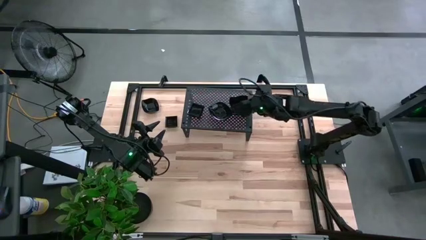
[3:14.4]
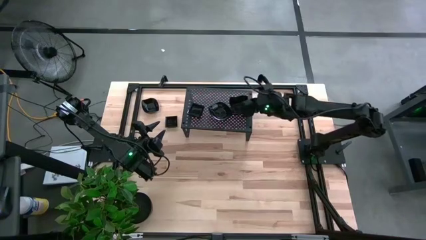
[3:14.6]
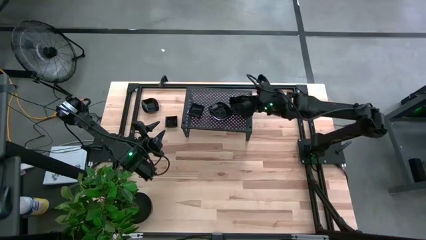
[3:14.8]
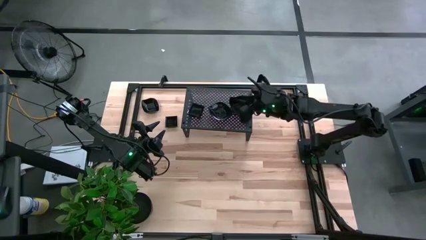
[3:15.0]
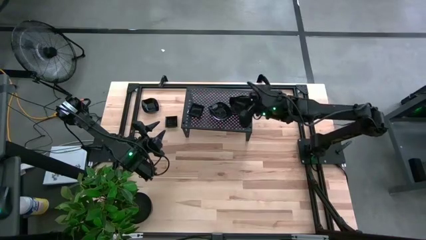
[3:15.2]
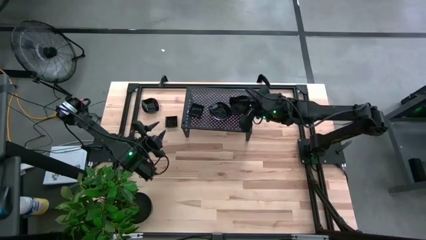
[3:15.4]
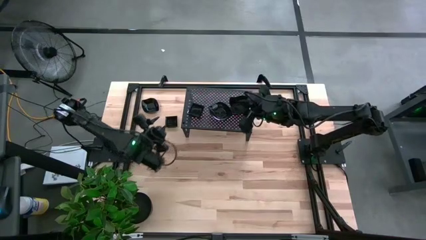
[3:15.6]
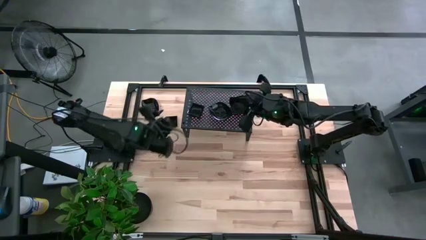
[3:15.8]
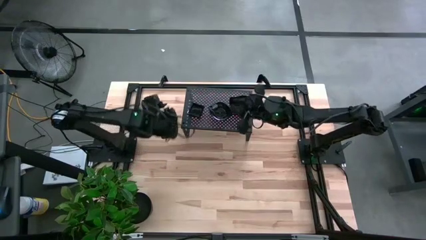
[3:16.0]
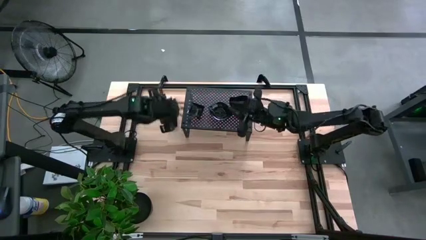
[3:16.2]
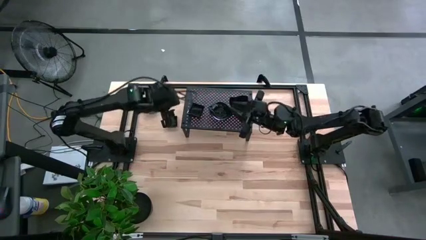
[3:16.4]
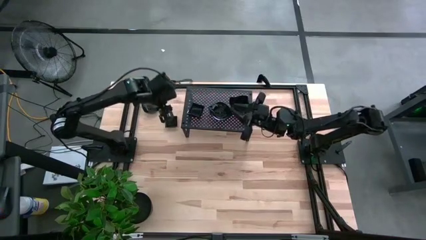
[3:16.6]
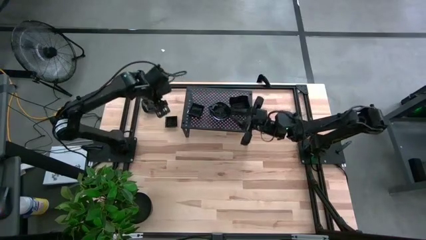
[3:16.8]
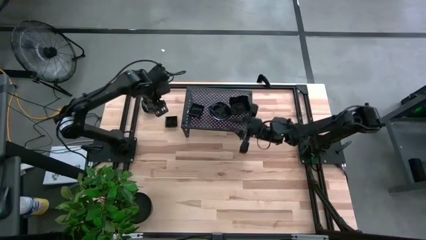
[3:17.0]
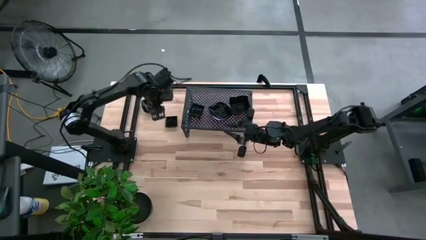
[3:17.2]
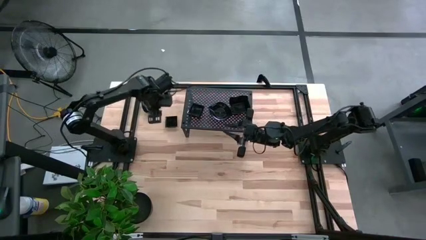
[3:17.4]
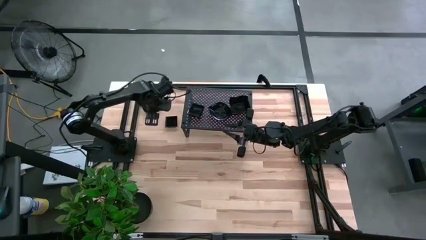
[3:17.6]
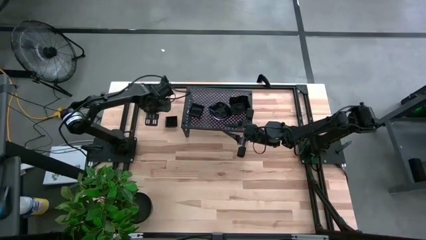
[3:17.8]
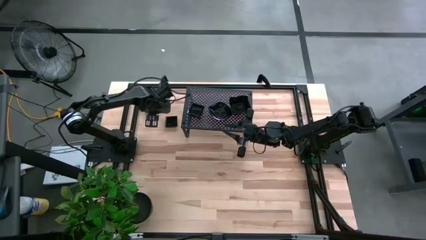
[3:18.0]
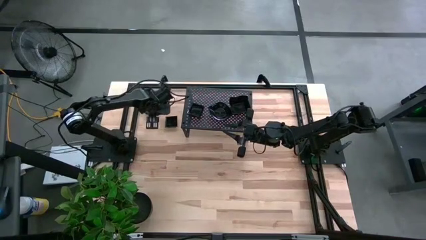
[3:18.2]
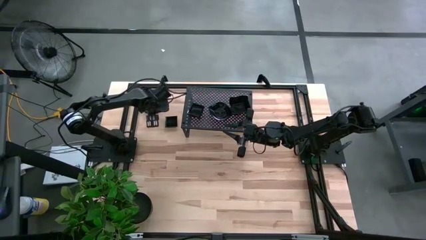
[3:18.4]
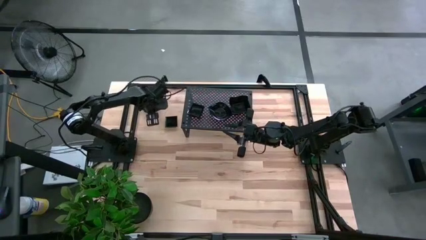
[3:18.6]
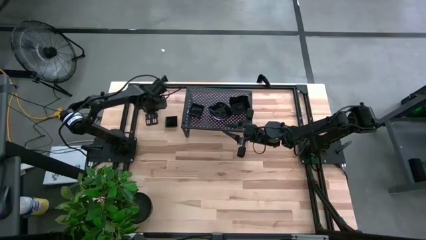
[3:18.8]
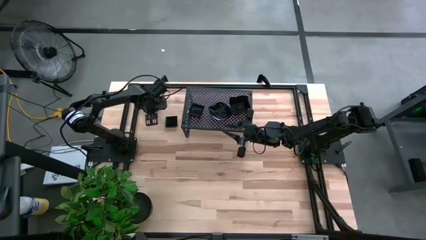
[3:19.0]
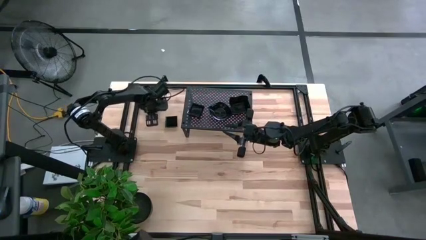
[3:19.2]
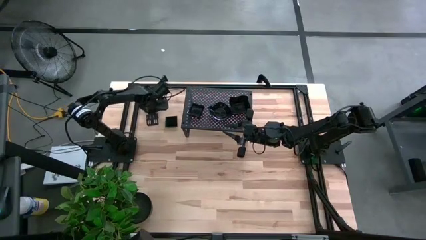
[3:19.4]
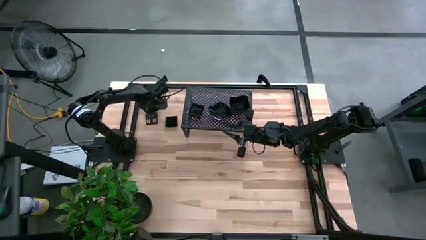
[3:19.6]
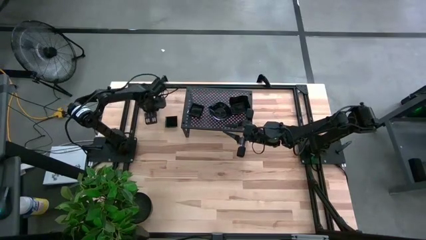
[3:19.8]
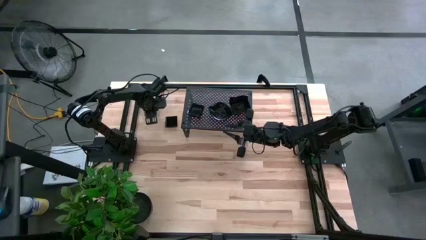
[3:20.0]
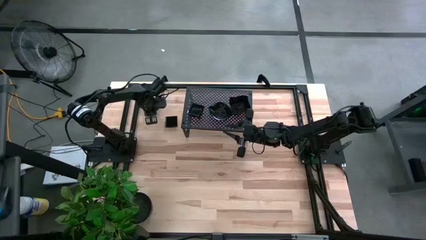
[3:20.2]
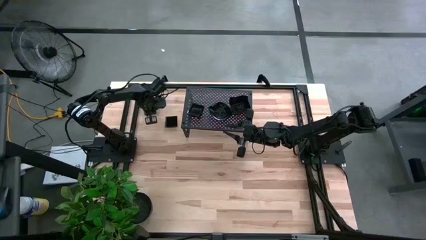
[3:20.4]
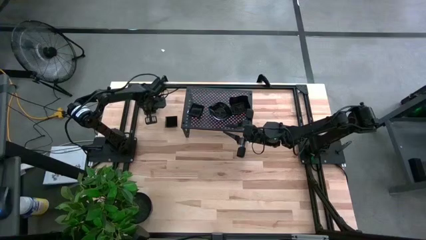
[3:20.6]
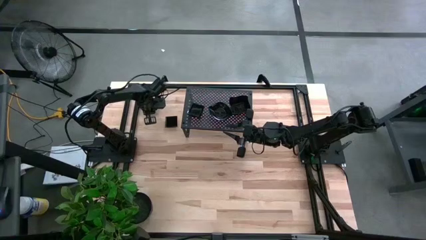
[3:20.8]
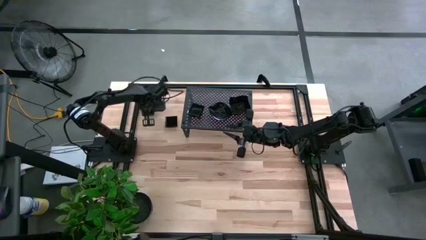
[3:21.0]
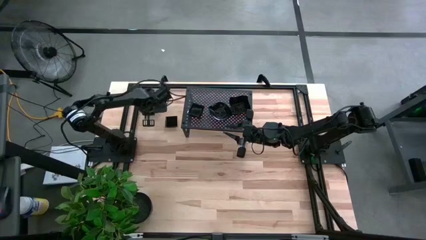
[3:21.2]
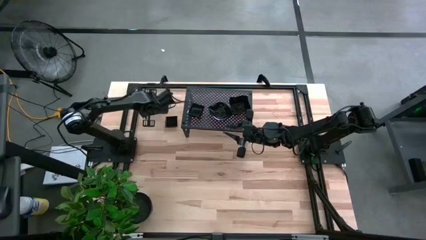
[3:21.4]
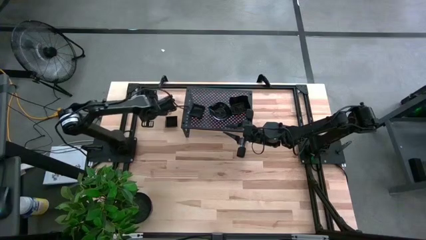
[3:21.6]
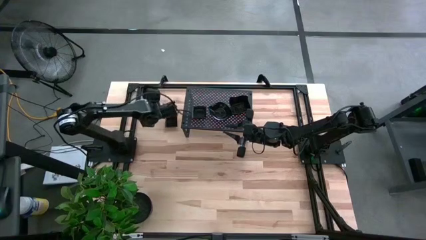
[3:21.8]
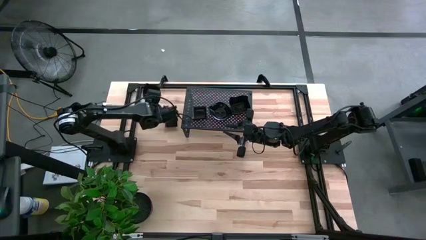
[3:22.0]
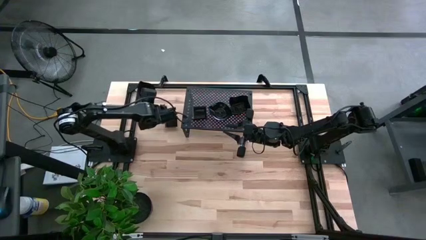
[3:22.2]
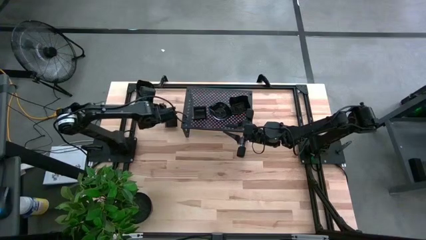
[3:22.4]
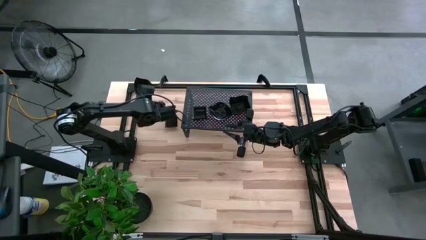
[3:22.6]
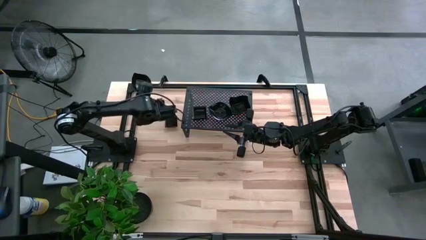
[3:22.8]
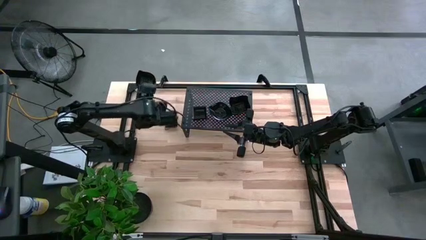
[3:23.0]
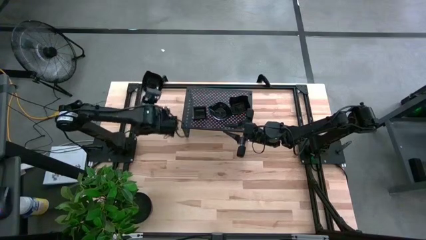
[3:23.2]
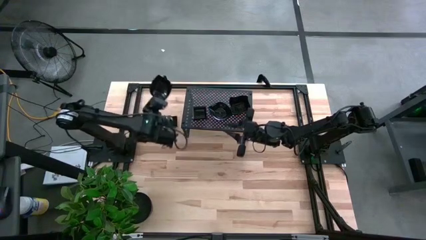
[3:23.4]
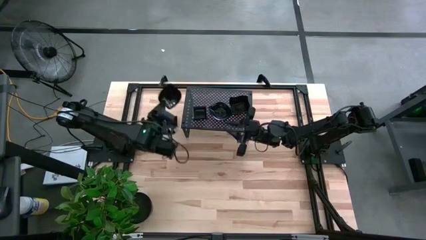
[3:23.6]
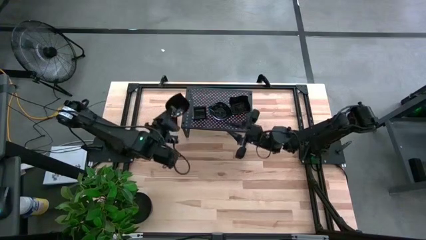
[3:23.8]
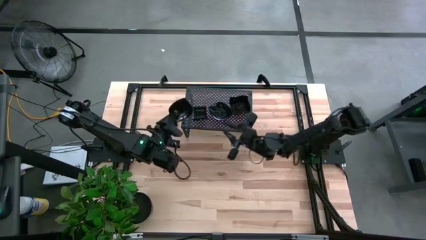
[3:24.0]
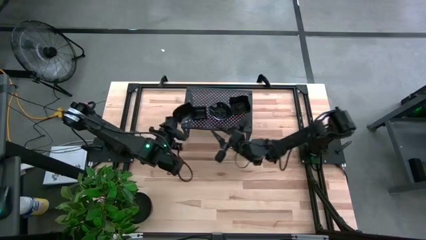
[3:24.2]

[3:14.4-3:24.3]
Task: Pick & Place Mini shaped plates
Stack the leaf-shaped plate on the leaf-shaped plates on the shelf

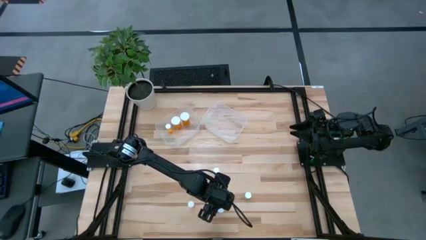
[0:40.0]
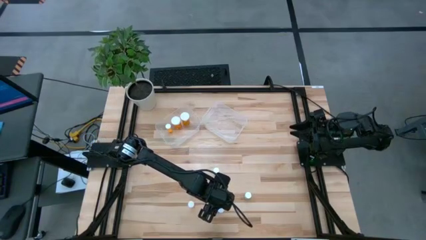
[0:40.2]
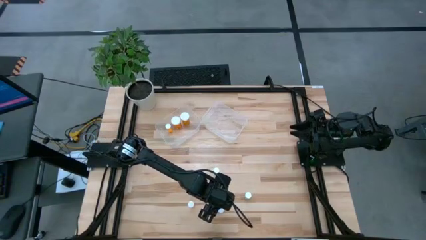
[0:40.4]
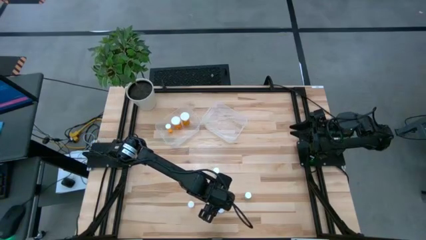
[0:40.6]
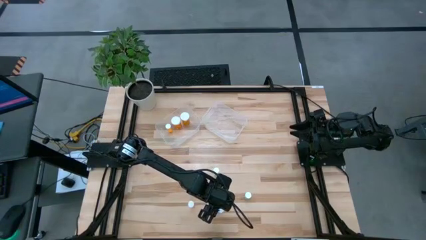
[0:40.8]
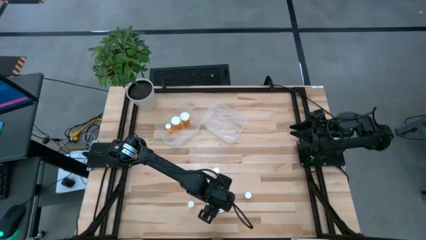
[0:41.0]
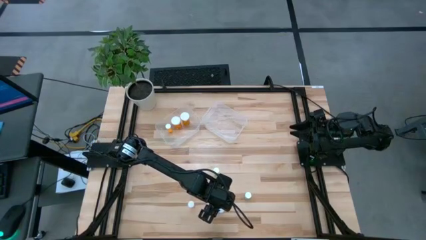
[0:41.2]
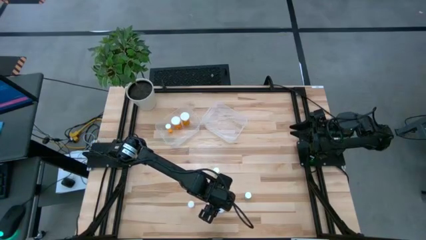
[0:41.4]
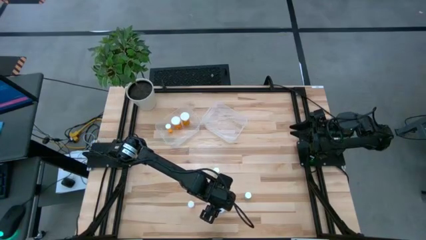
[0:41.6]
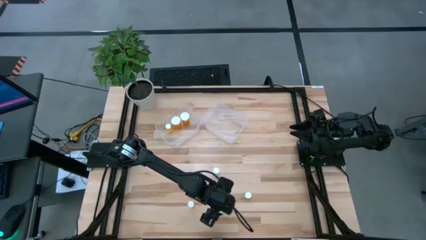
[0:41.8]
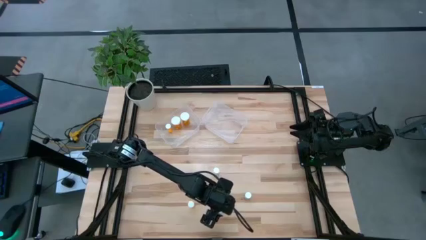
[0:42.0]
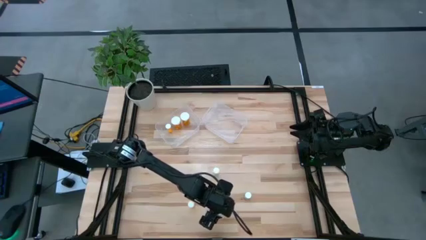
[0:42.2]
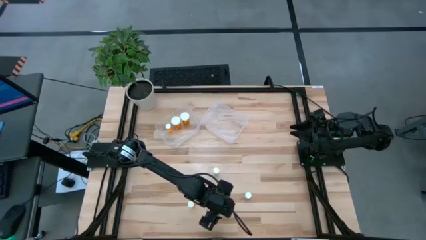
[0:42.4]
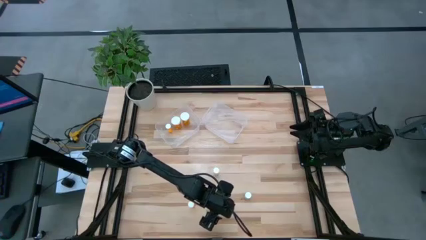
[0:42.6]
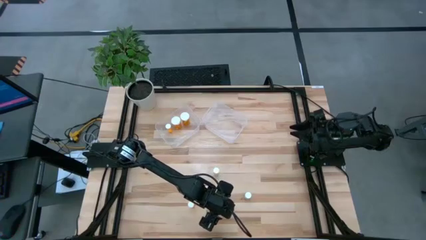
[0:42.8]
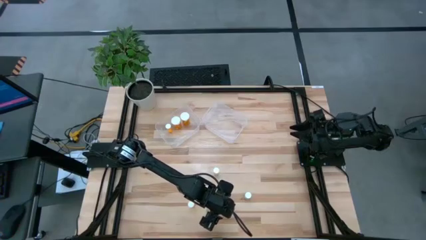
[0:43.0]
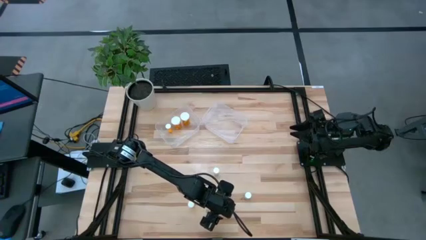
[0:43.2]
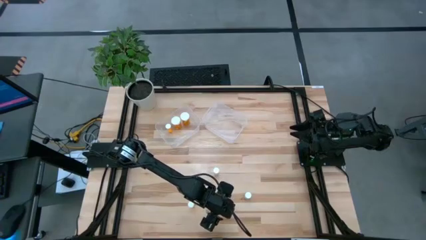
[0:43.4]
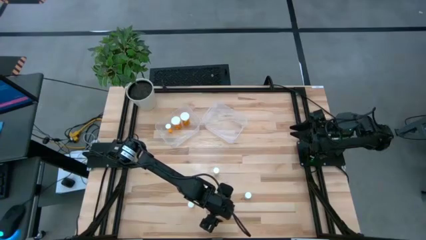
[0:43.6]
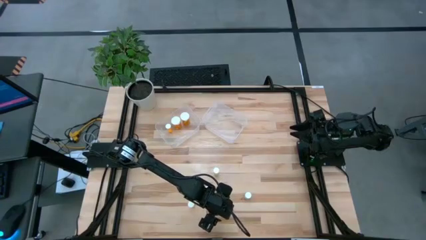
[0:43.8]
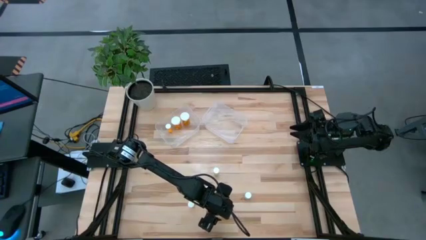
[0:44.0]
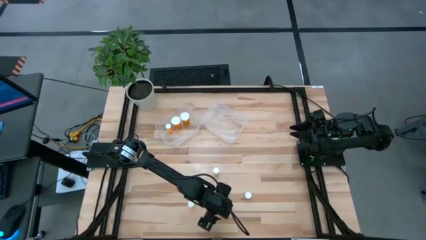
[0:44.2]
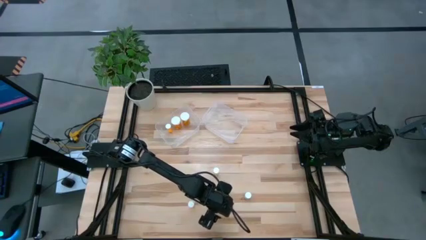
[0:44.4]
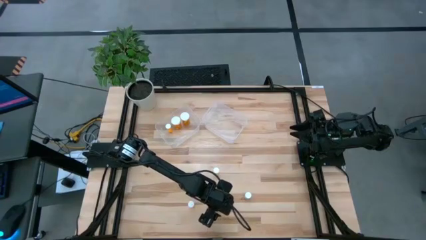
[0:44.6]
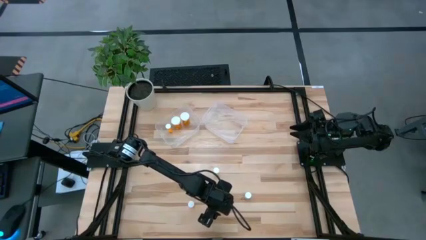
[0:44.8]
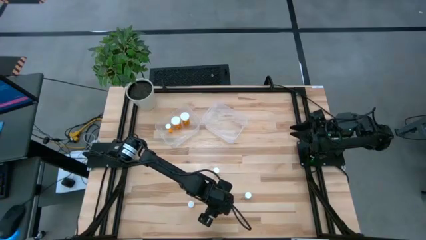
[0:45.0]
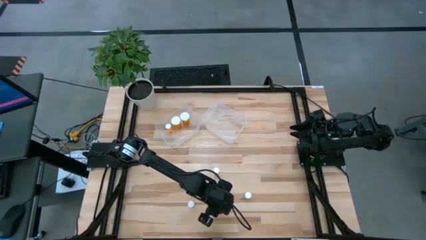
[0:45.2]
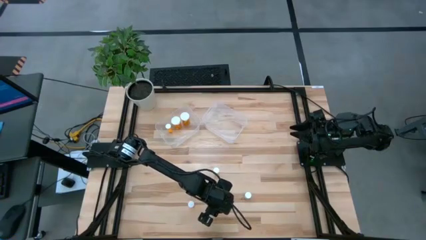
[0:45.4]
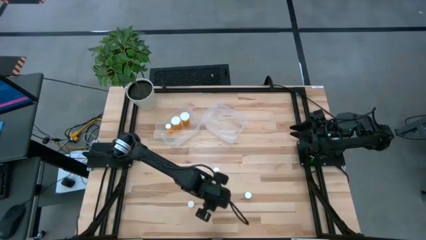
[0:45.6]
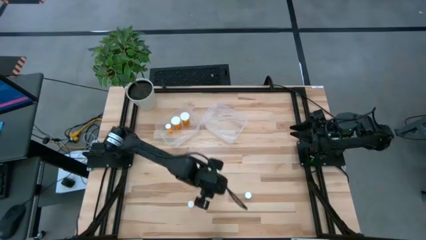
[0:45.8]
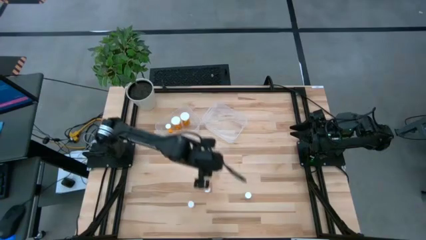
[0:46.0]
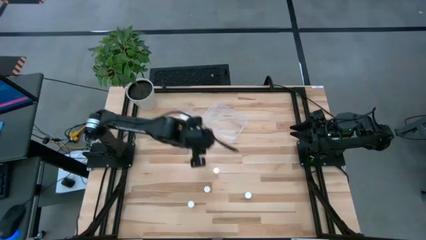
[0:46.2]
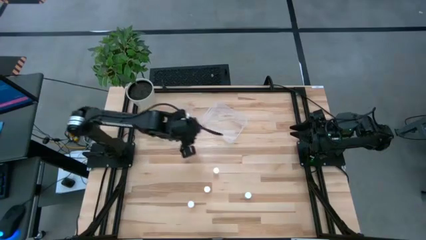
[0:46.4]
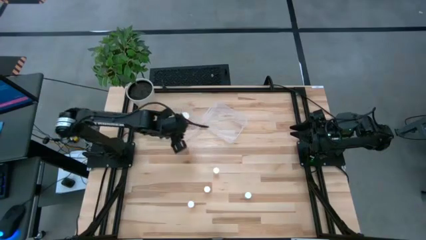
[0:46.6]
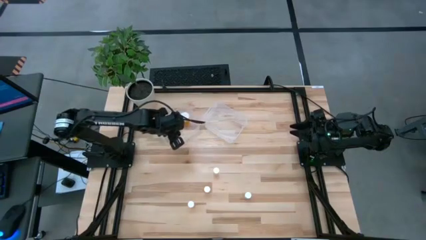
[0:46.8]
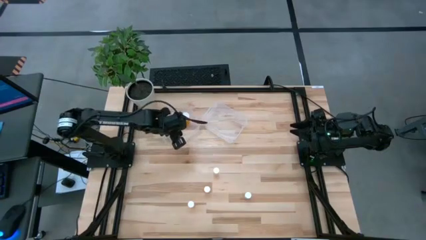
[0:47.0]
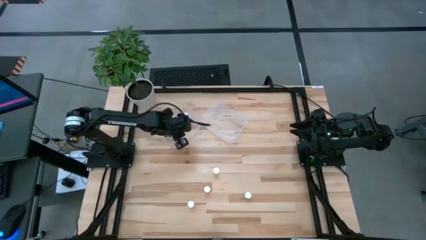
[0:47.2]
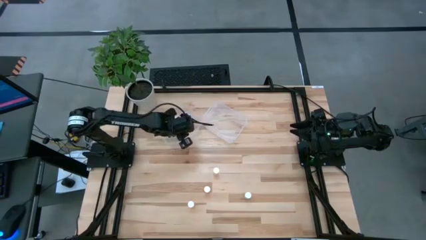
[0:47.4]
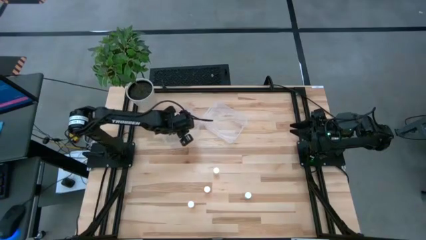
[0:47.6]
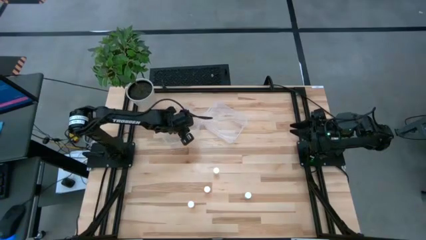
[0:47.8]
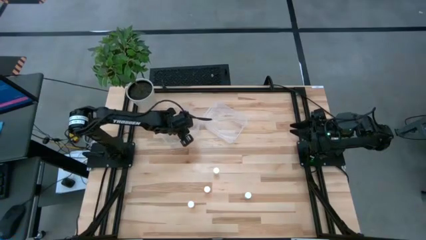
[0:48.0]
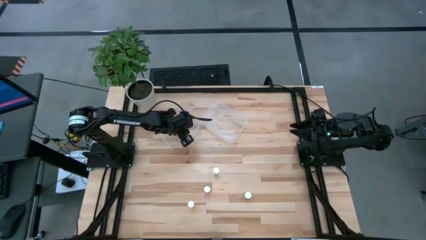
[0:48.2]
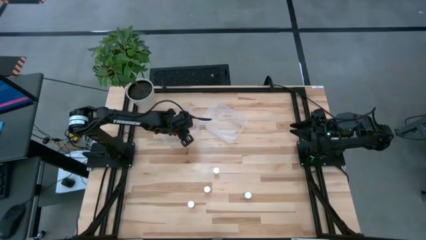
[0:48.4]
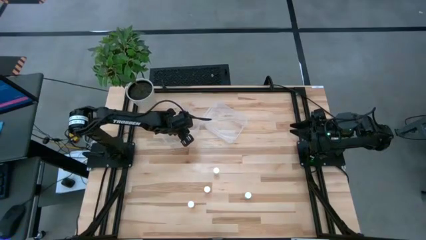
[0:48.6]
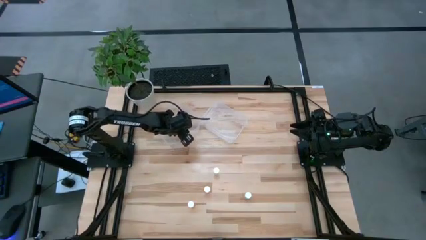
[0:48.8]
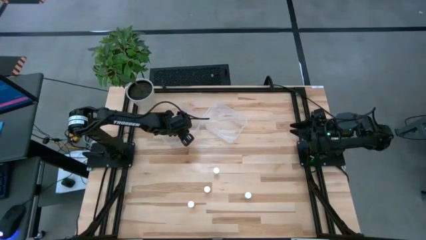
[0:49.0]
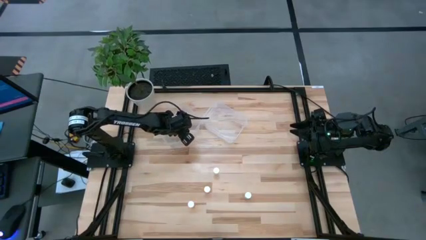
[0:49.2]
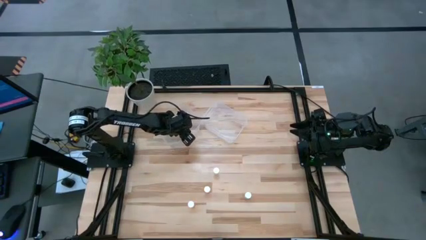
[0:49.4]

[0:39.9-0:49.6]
Task: Pick and place medicine bottles into bin by pill shape (circle, oval)
Put the small blue capsule bottle into the left transparent bin
